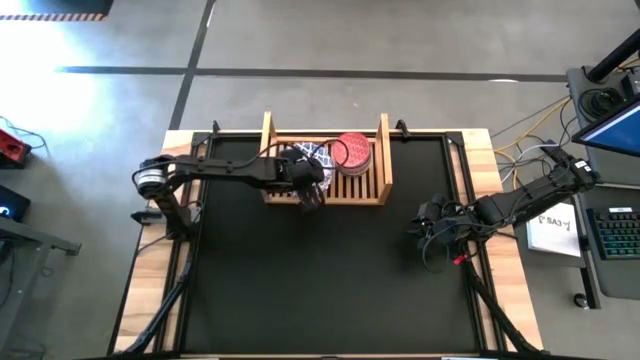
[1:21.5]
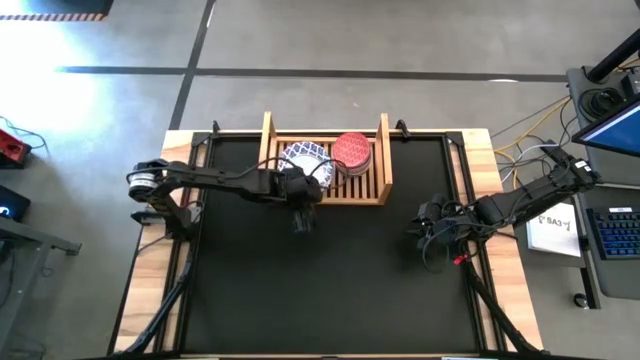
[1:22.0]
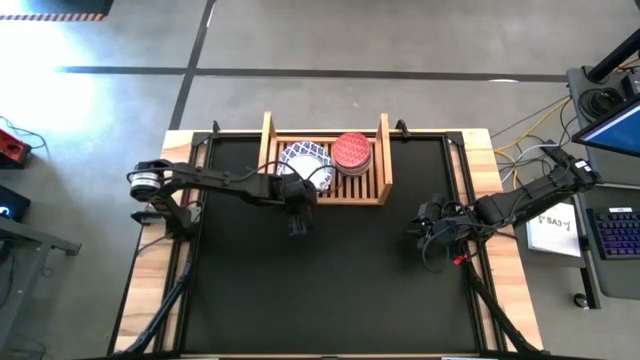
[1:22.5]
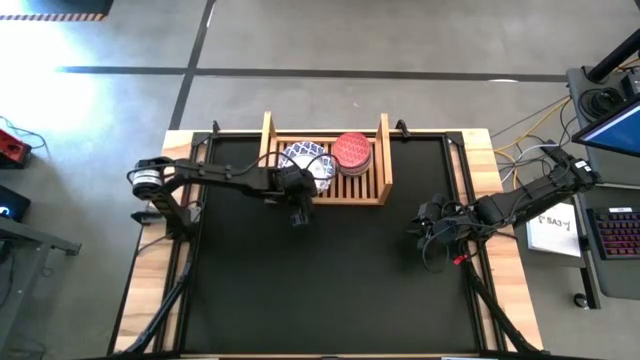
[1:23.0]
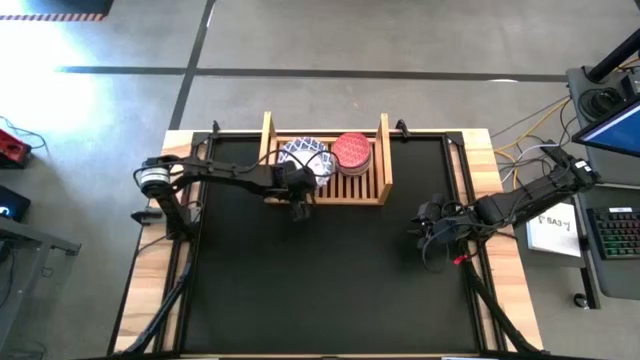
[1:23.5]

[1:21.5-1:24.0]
Task: Place and stack bowls onto a shelf
Adjust the stacked white blue patterned bowls on the shelf

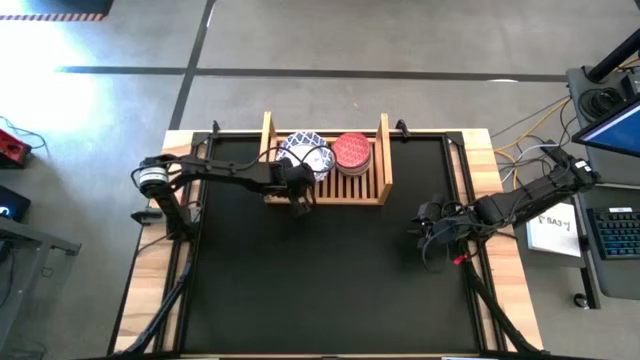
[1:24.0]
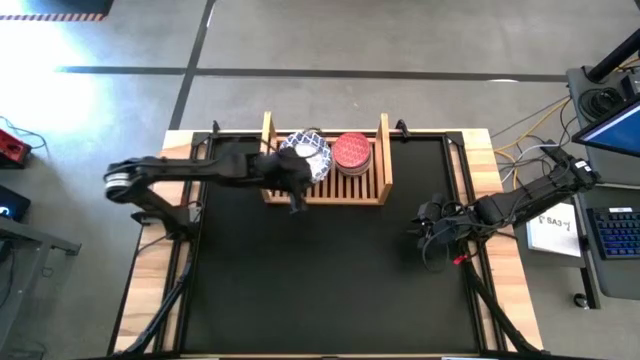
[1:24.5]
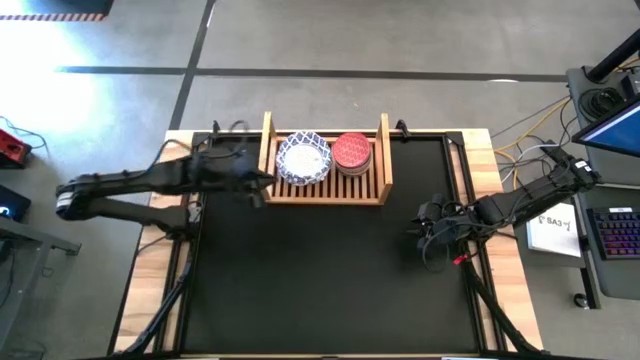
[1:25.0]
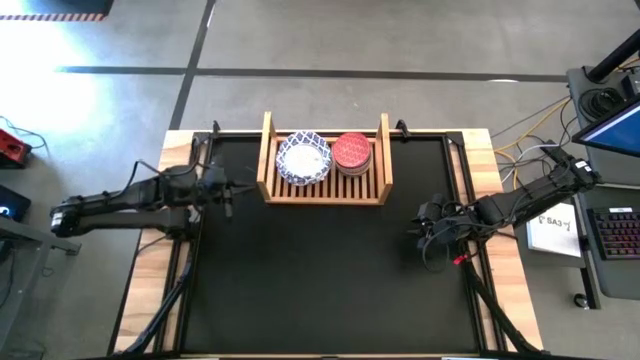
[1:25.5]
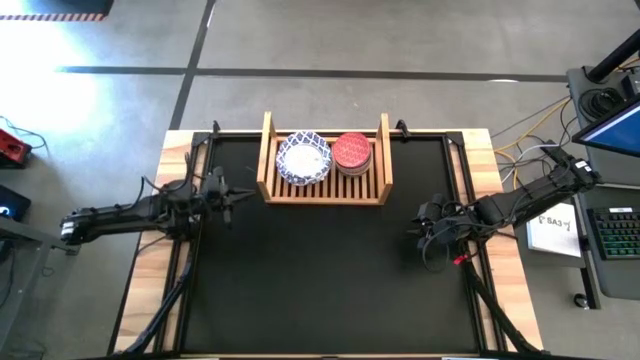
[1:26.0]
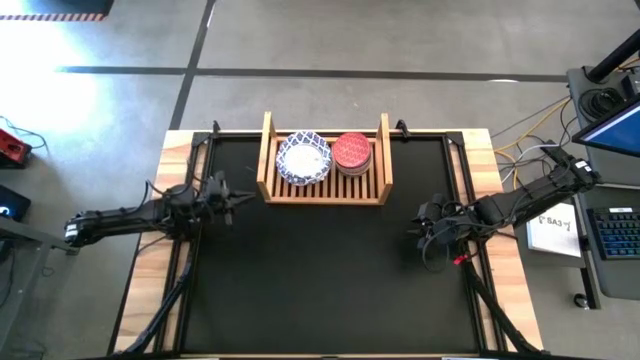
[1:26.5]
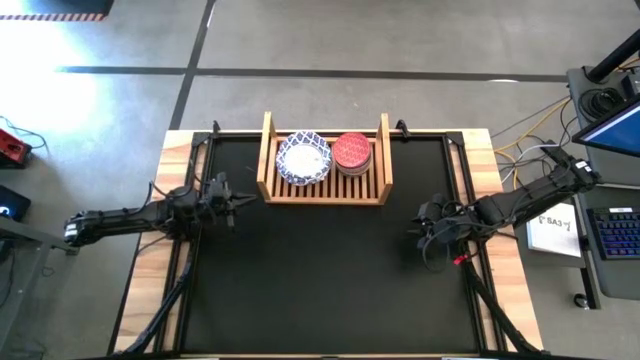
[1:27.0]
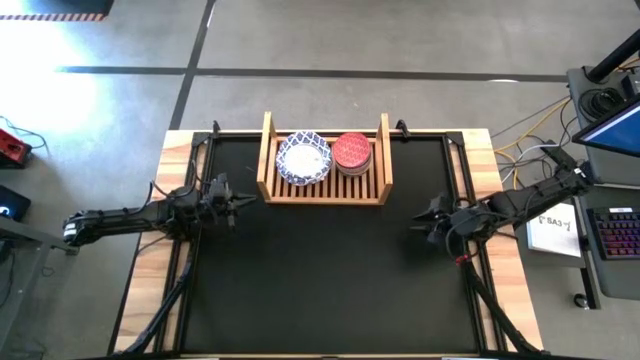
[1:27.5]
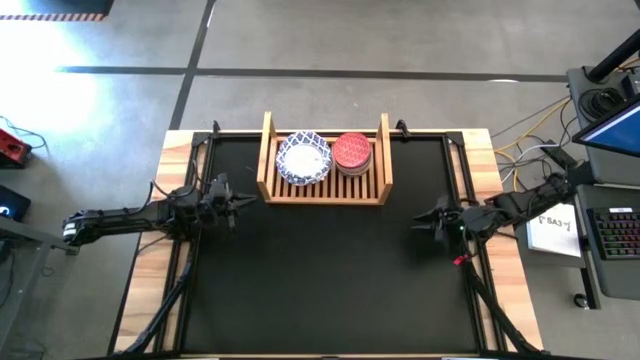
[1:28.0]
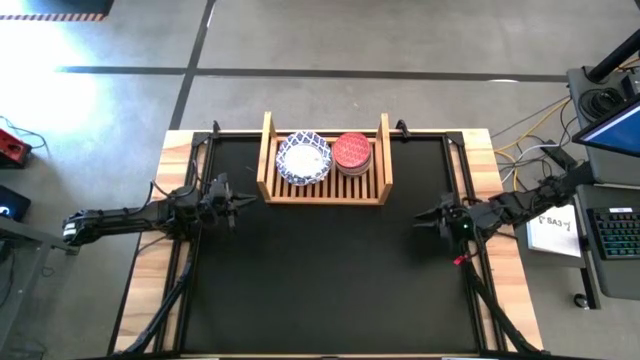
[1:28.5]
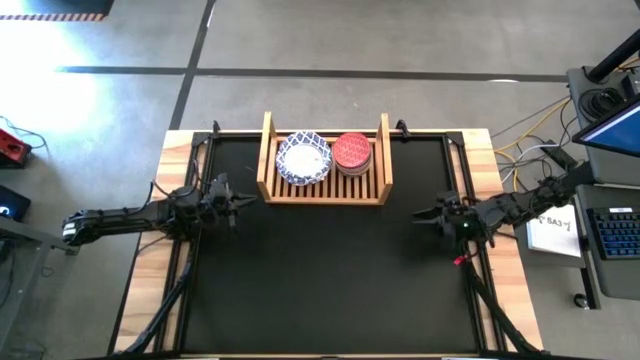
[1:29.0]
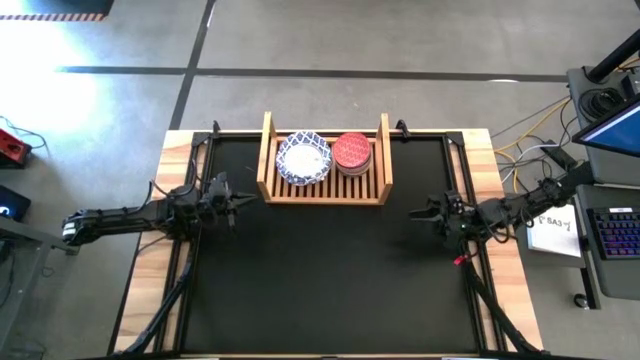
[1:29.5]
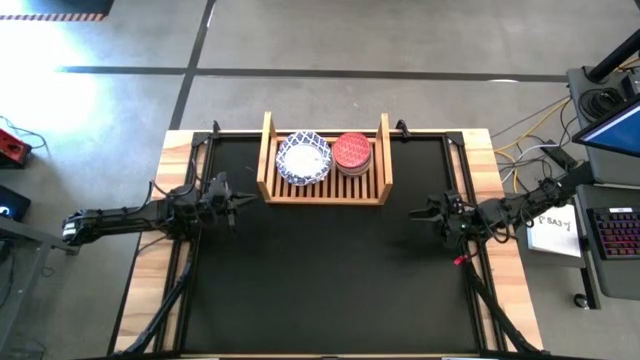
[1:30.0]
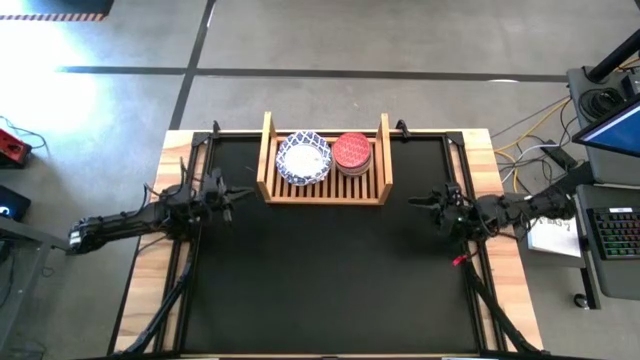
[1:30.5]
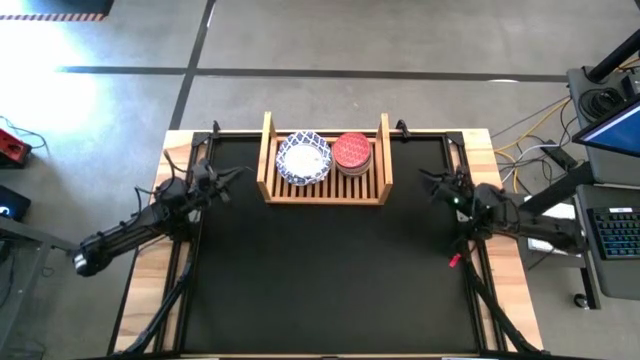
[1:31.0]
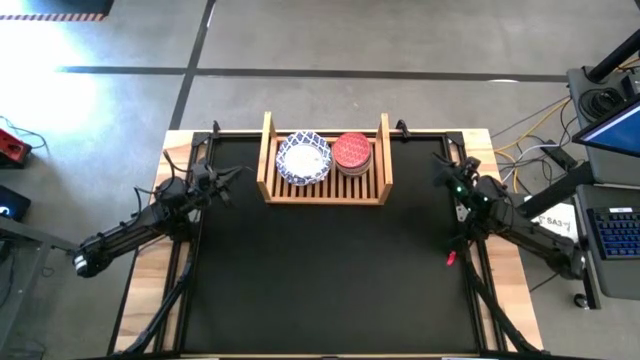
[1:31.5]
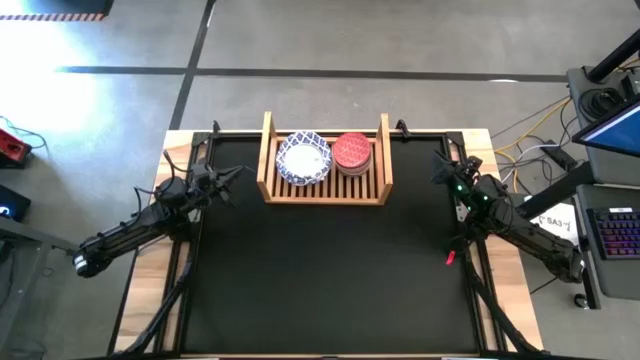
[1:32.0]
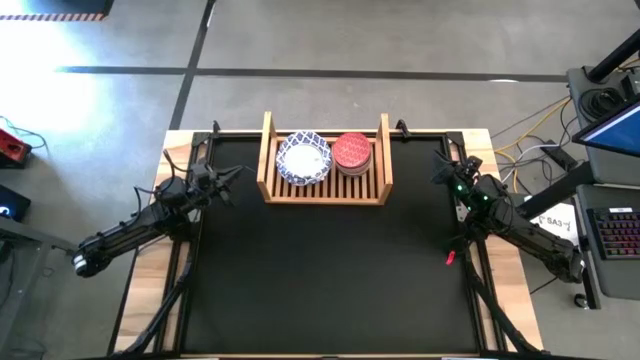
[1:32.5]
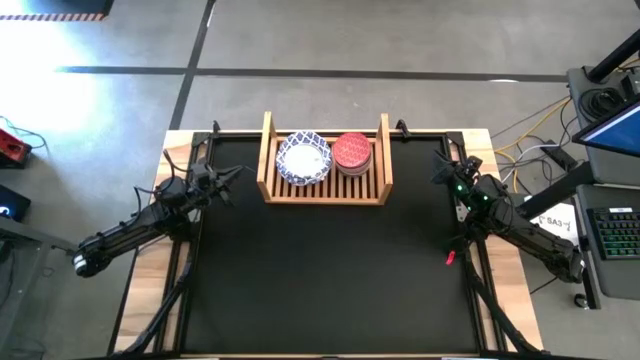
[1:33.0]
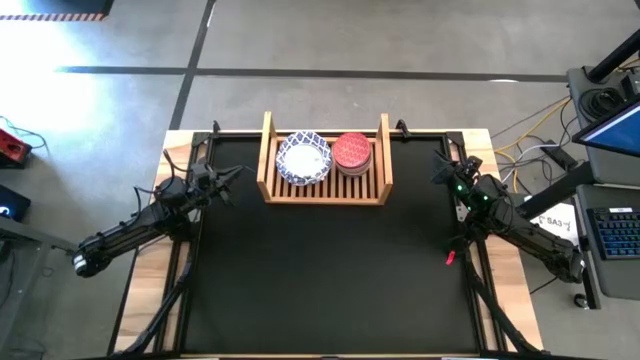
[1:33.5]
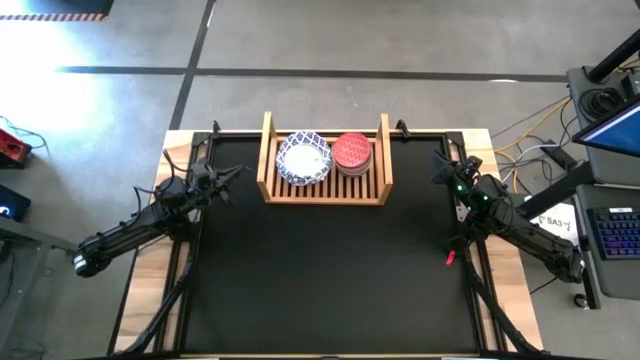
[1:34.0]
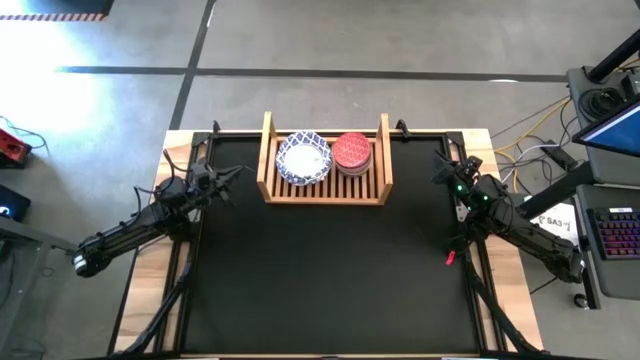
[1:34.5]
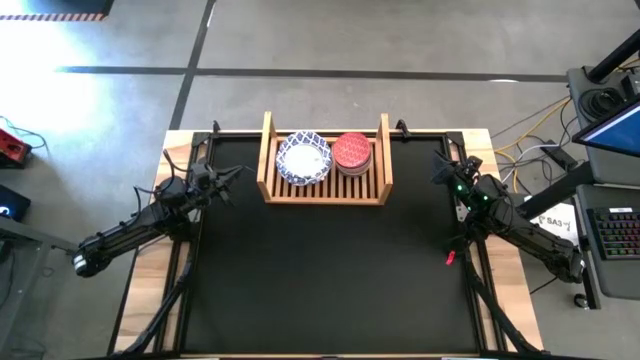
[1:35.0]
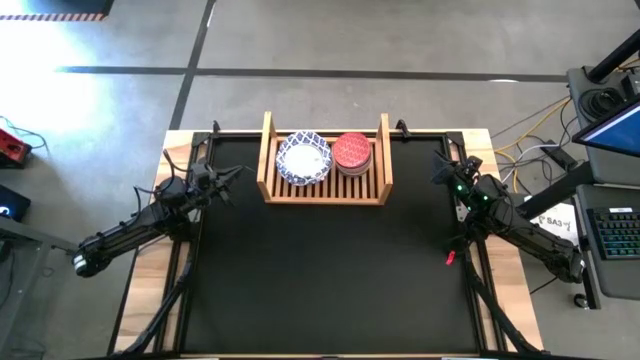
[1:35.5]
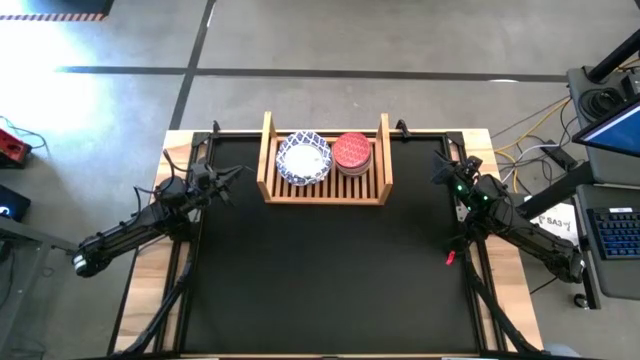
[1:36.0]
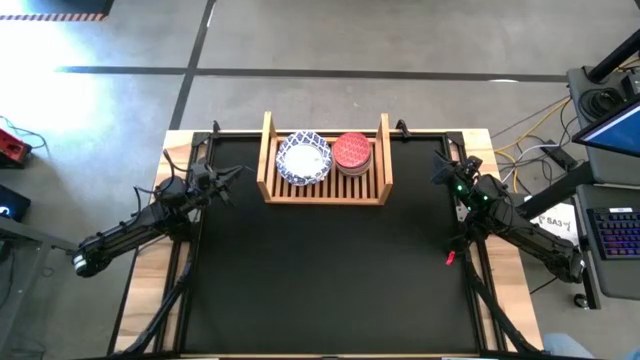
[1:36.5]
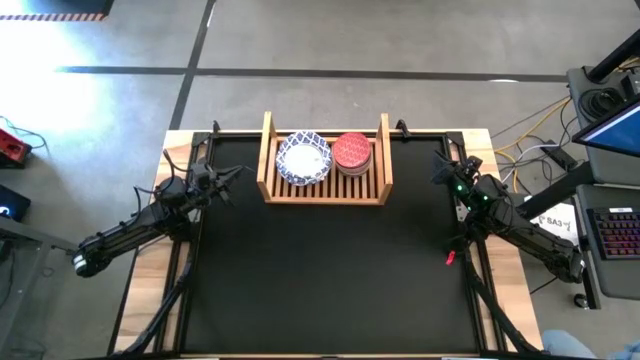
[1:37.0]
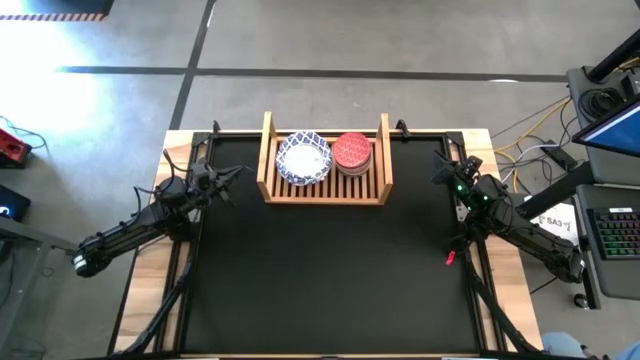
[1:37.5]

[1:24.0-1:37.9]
Return to Home Position

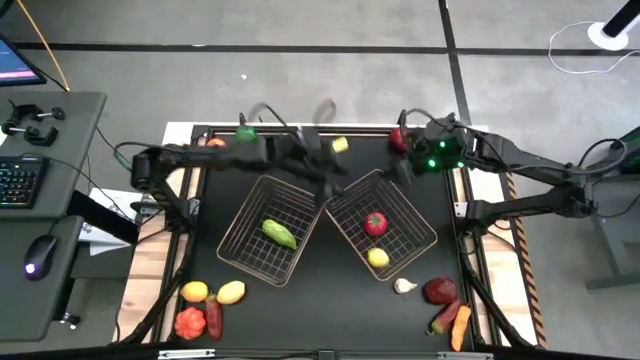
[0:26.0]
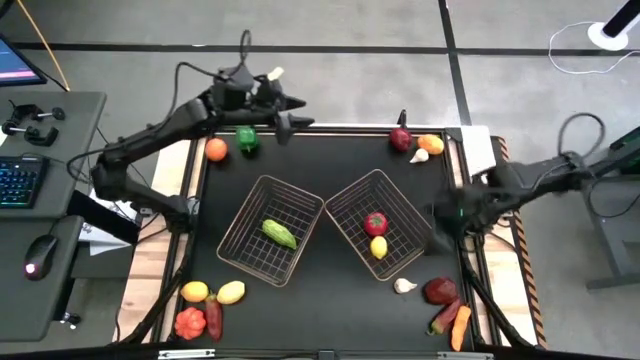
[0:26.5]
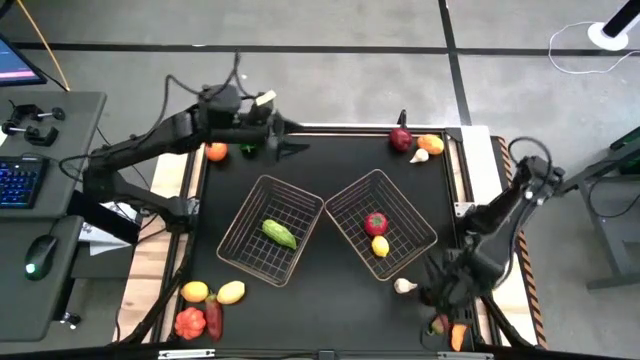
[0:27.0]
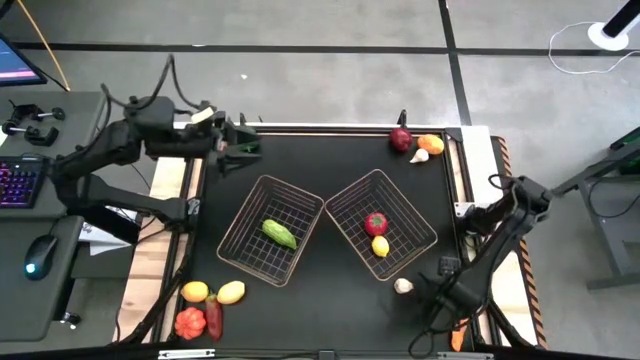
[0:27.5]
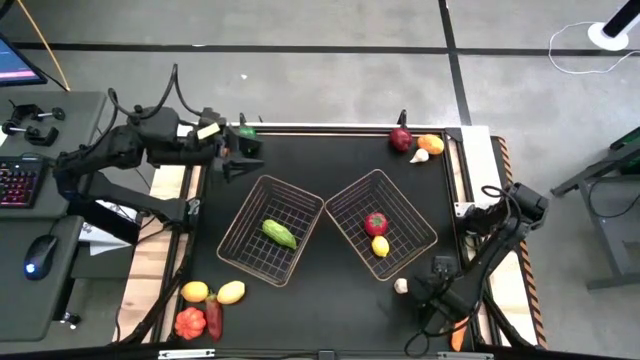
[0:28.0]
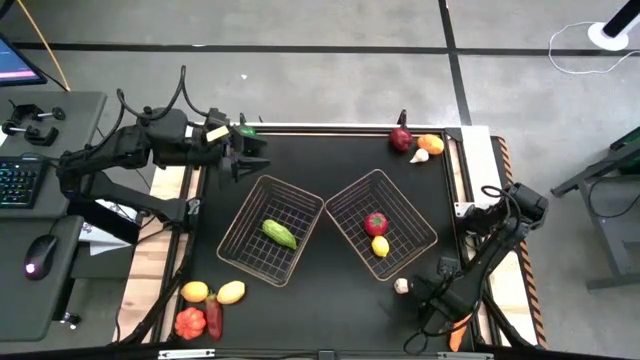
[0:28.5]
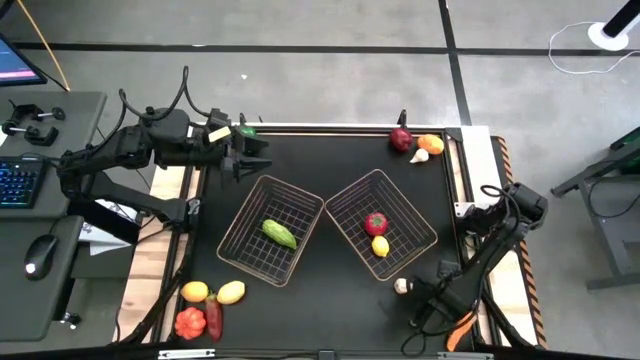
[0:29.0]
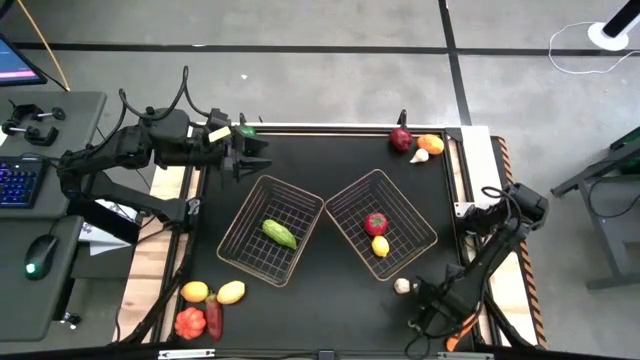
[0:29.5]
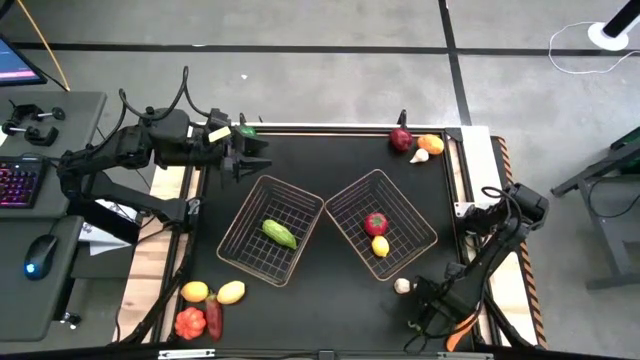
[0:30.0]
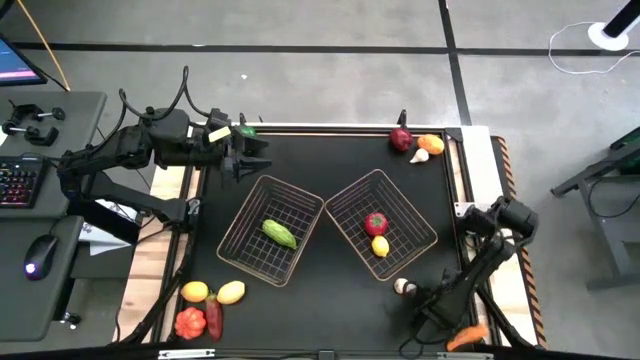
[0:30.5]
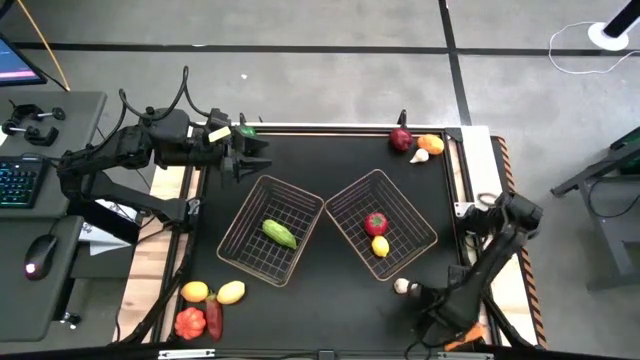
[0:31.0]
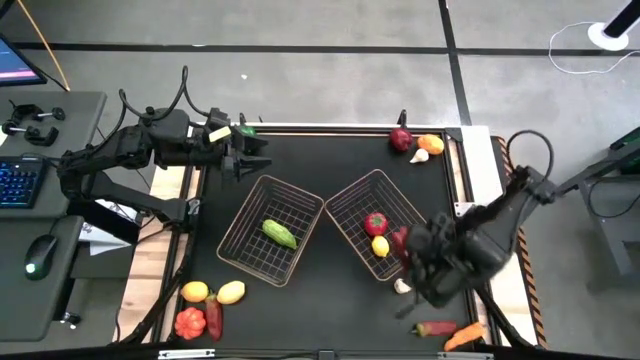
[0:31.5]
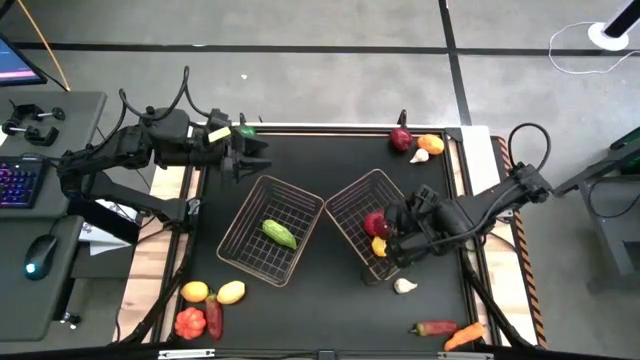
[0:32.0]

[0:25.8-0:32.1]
Task: Sort produce into baskets
Put the bottom apple into the right basket
